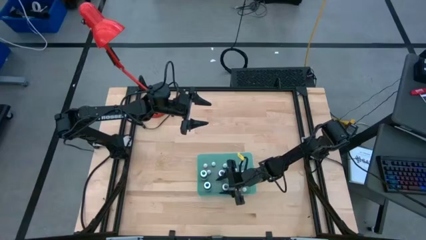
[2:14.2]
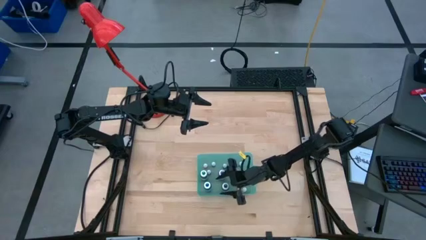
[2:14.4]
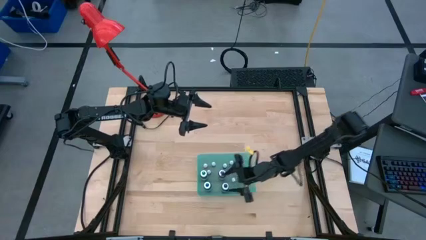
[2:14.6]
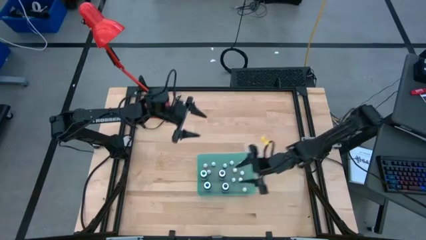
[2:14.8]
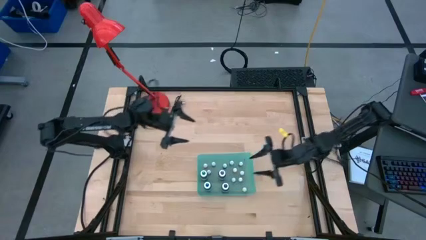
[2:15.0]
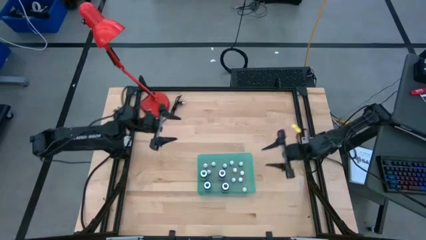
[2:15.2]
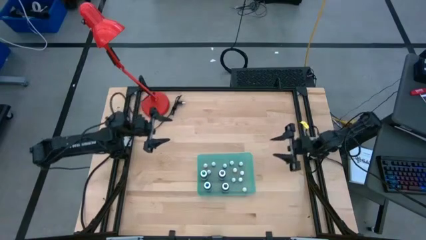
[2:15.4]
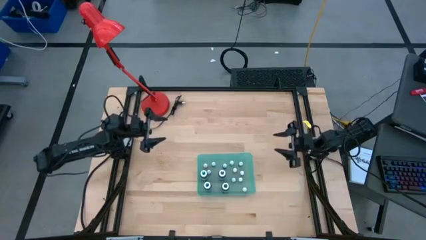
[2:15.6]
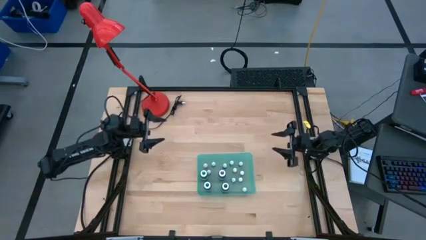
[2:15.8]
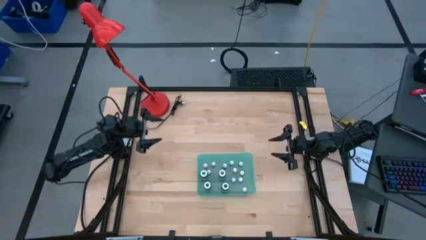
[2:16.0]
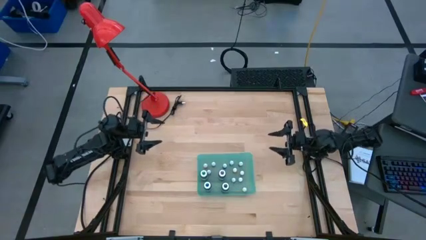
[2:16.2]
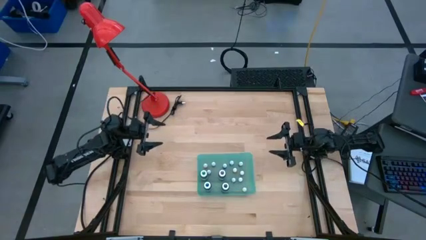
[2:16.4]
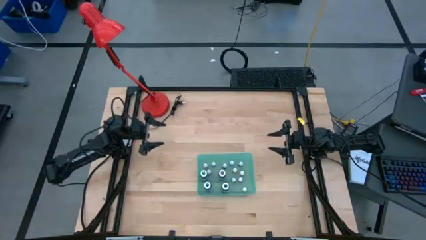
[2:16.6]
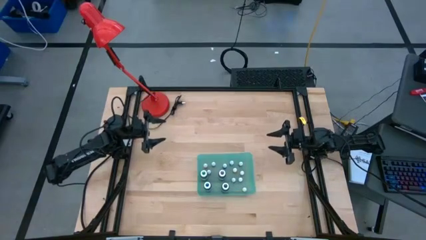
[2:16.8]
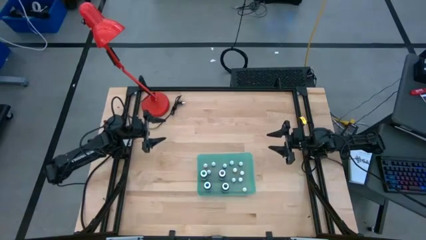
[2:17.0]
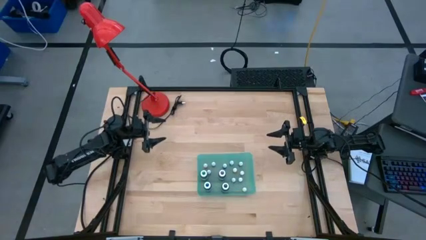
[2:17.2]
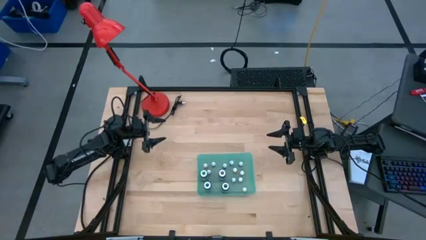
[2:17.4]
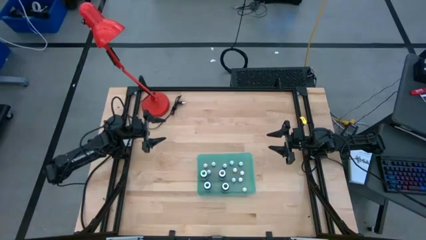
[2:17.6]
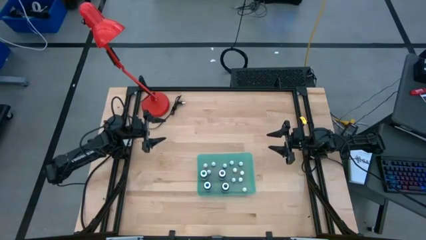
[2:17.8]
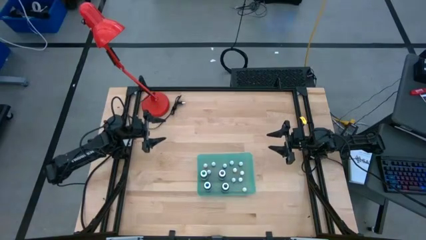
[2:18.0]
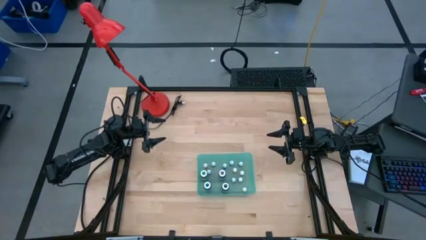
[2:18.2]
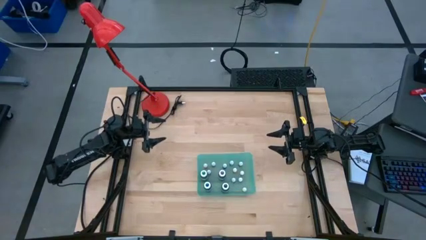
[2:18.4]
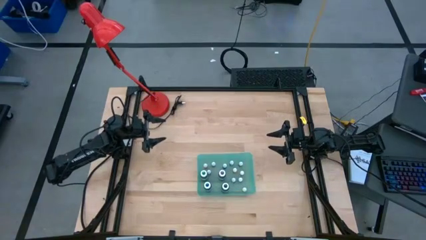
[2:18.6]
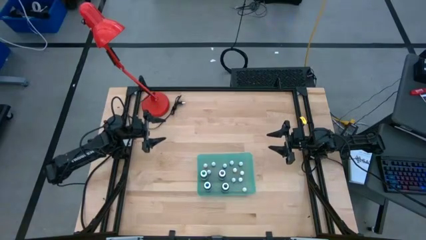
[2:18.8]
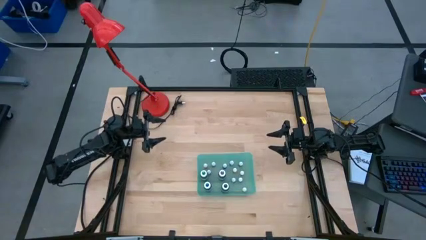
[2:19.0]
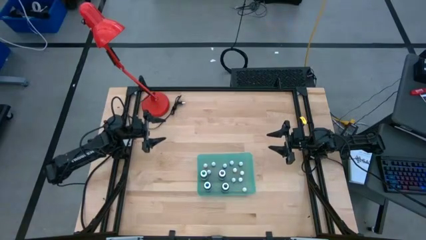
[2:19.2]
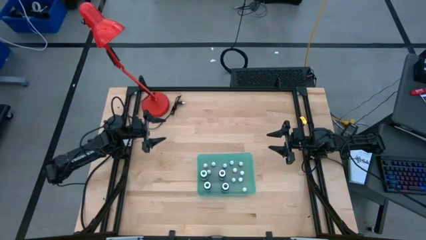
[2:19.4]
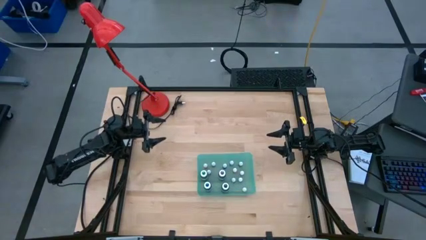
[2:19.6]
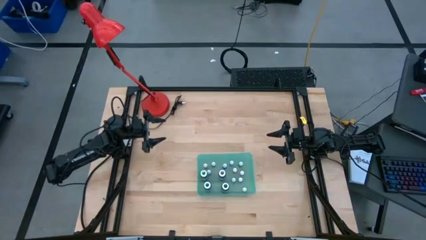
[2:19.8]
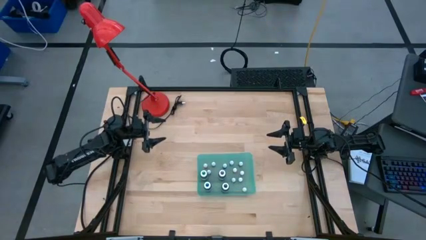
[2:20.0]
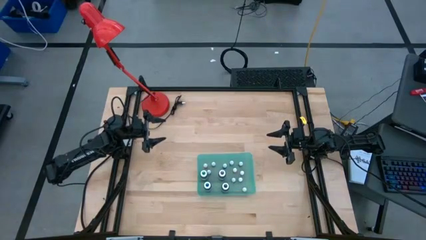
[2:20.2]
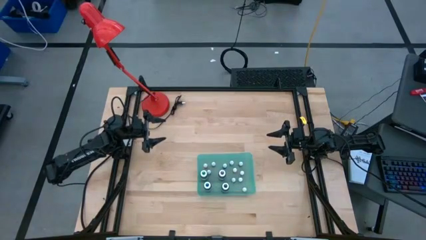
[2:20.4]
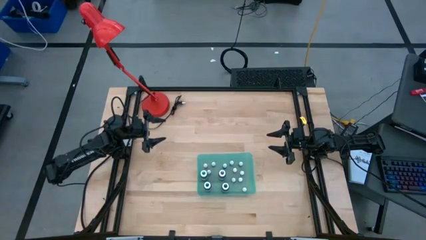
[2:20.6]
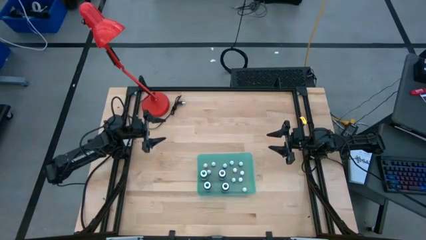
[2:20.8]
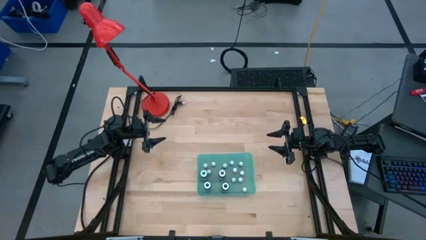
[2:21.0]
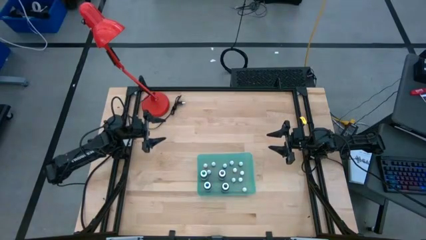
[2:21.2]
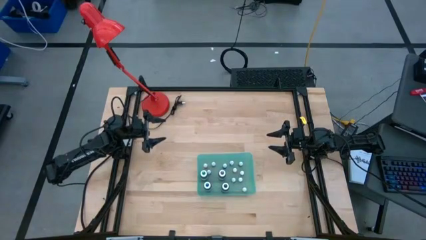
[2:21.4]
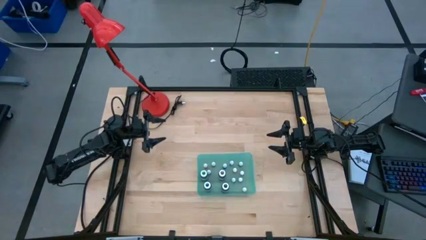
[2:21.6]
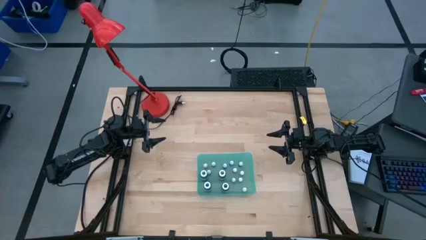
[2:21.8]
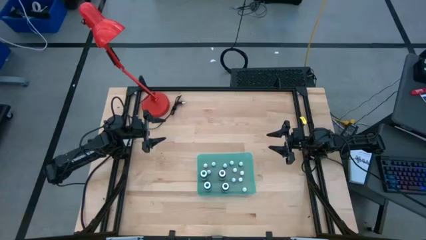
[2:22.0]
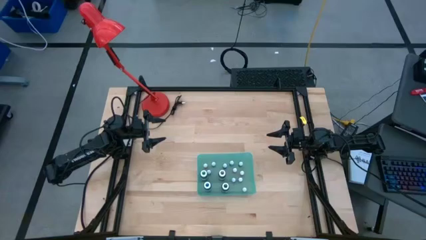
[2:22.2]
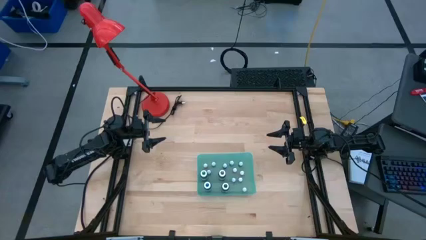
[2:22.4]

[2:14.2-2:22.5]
Task: Pick & Place food coloring
Return to Home Position

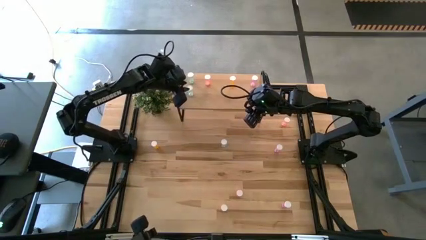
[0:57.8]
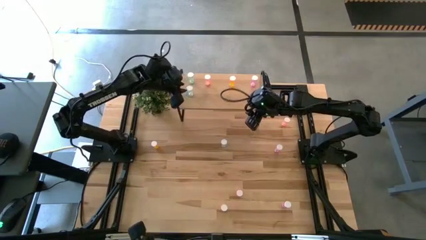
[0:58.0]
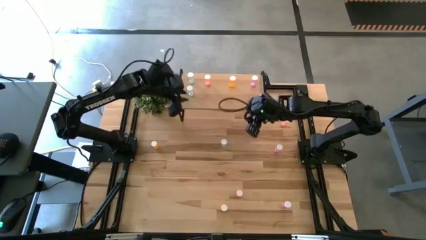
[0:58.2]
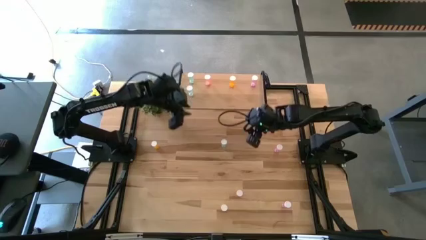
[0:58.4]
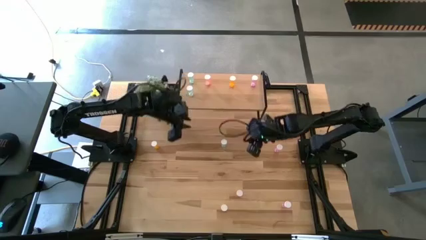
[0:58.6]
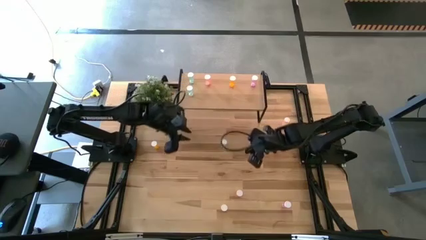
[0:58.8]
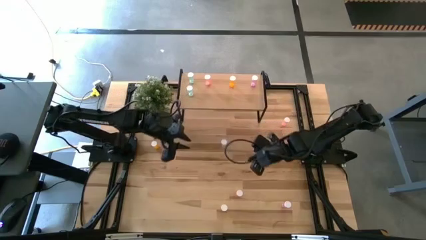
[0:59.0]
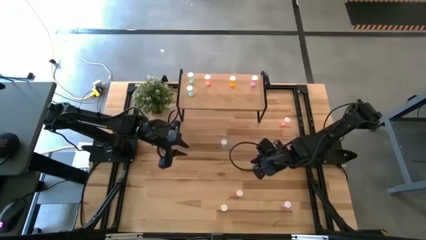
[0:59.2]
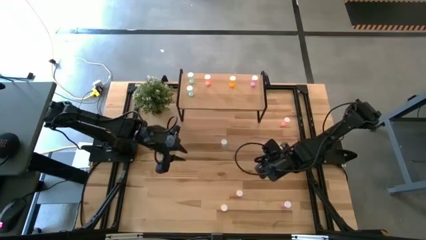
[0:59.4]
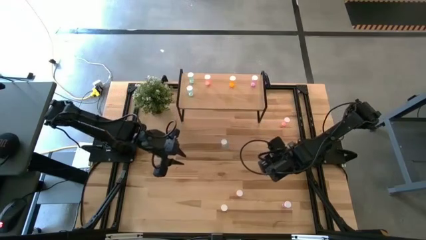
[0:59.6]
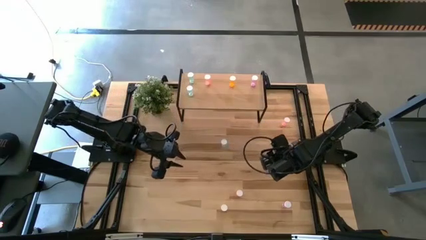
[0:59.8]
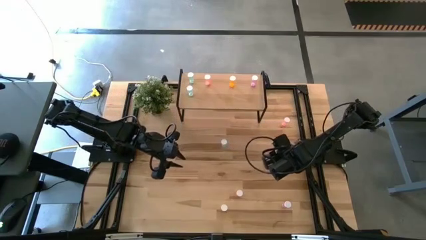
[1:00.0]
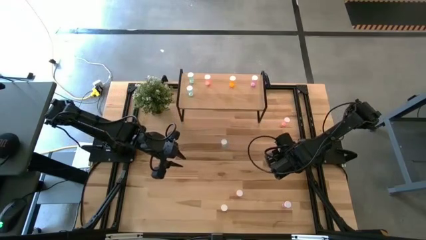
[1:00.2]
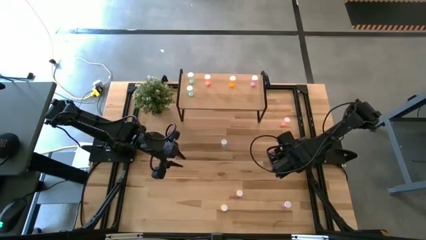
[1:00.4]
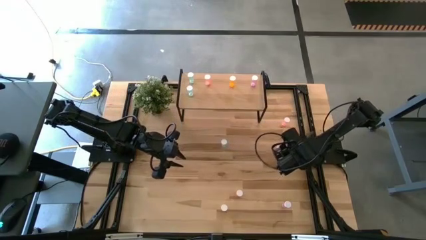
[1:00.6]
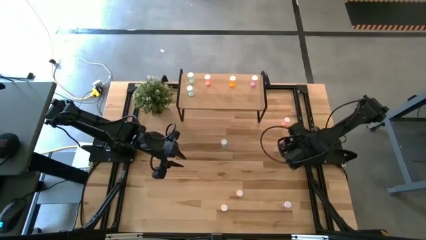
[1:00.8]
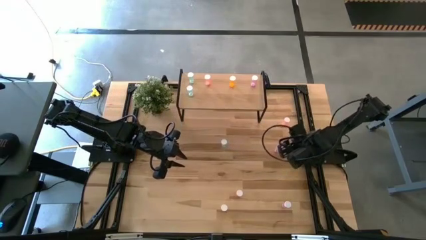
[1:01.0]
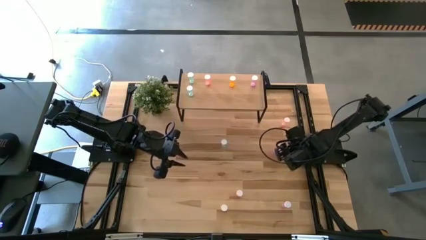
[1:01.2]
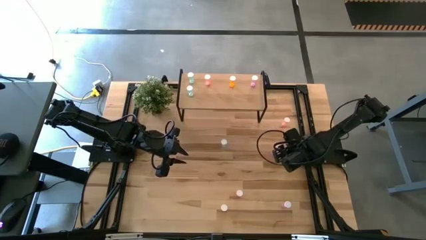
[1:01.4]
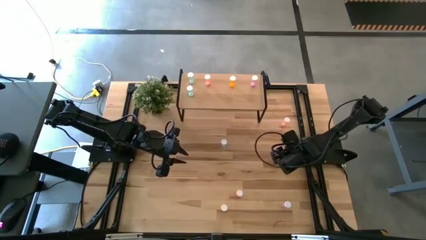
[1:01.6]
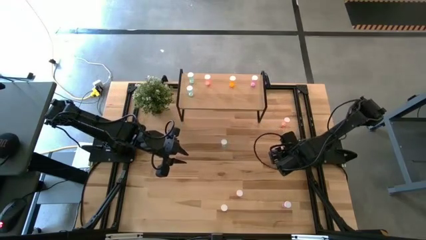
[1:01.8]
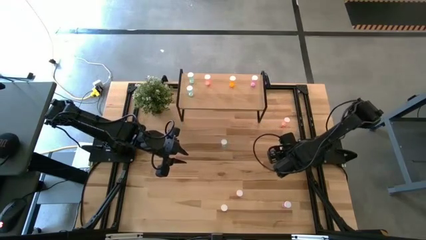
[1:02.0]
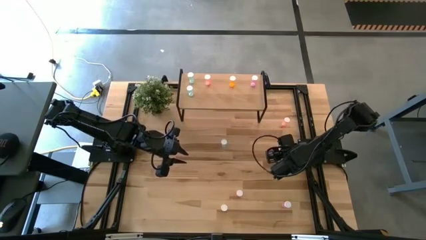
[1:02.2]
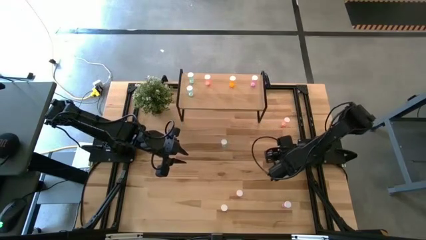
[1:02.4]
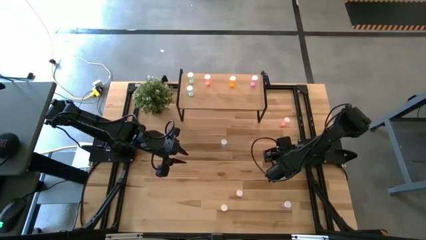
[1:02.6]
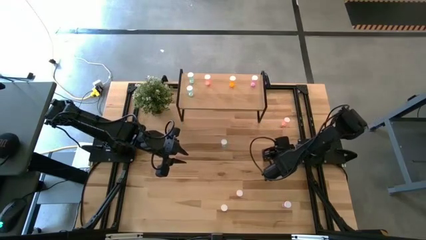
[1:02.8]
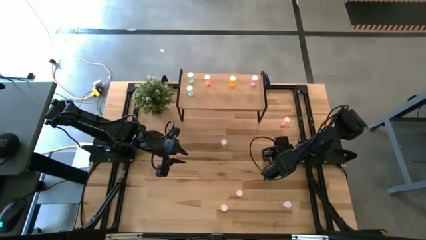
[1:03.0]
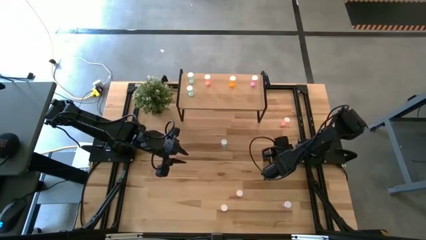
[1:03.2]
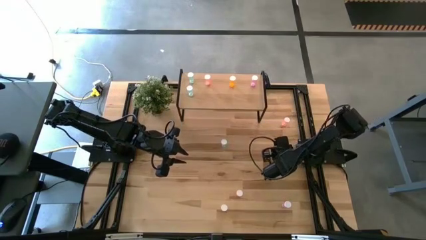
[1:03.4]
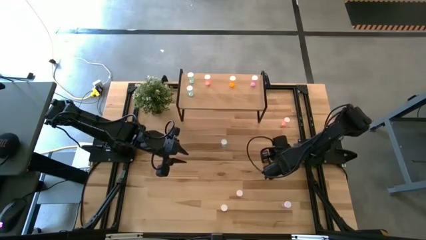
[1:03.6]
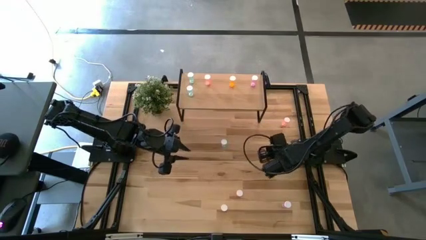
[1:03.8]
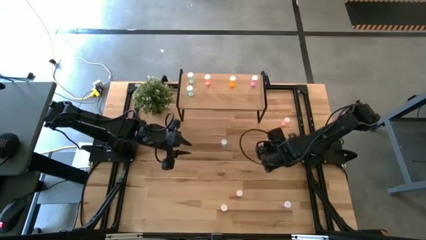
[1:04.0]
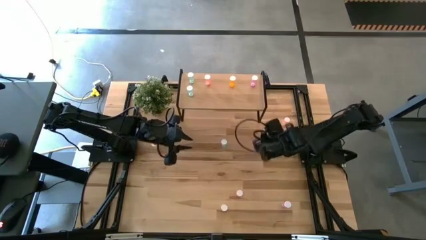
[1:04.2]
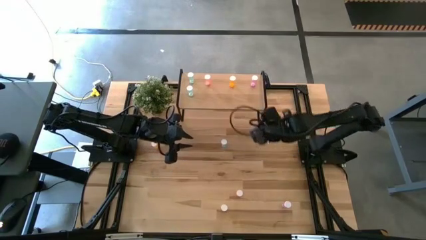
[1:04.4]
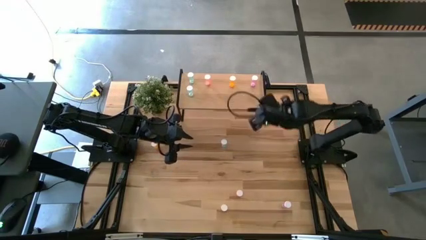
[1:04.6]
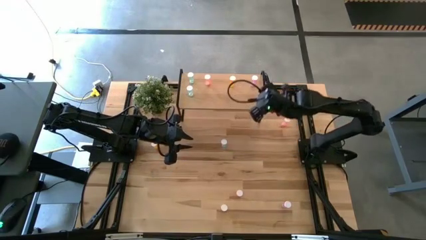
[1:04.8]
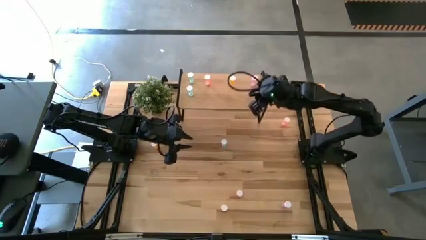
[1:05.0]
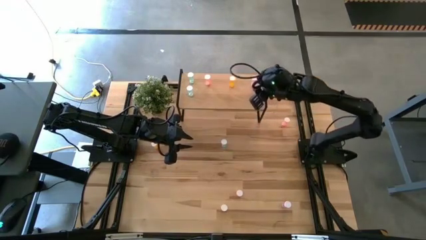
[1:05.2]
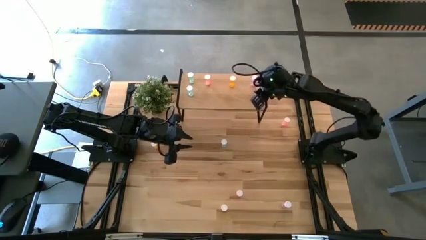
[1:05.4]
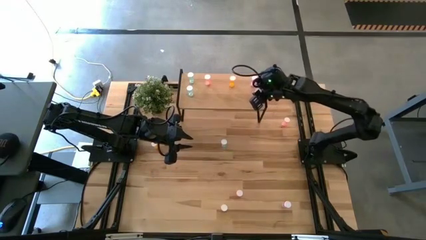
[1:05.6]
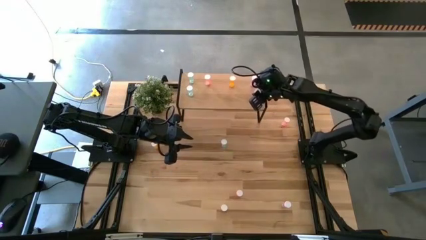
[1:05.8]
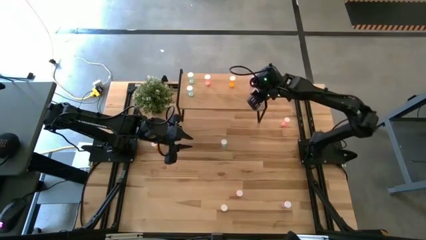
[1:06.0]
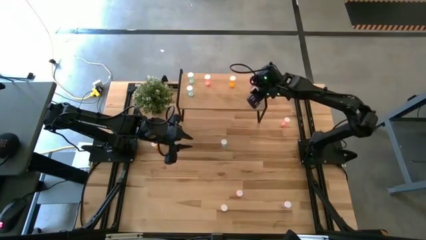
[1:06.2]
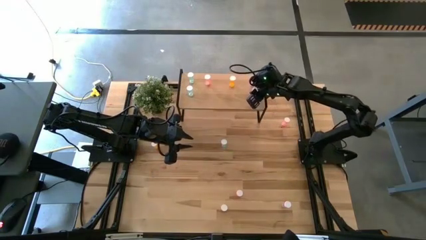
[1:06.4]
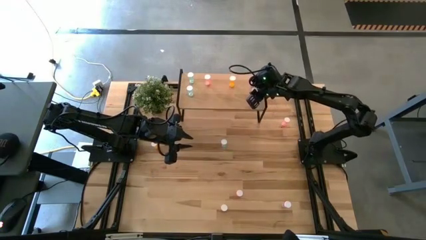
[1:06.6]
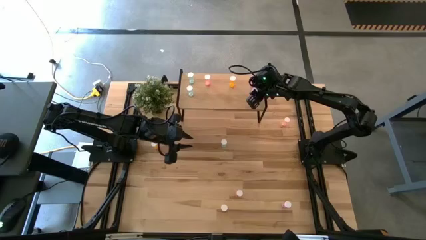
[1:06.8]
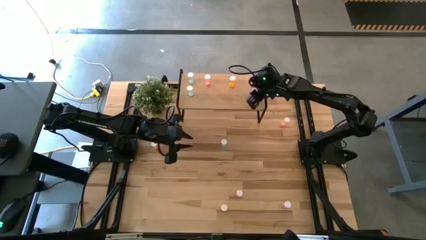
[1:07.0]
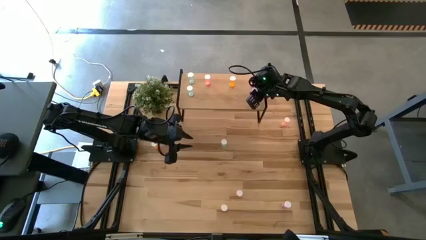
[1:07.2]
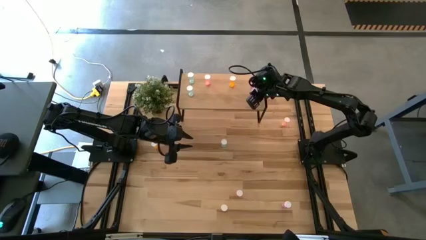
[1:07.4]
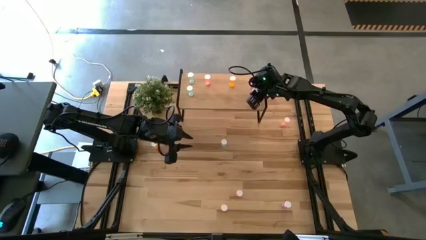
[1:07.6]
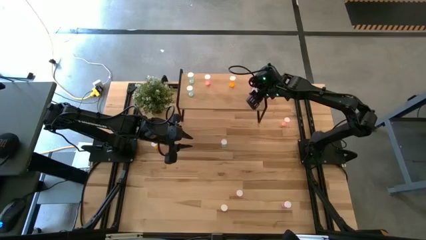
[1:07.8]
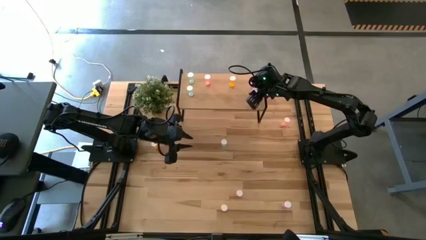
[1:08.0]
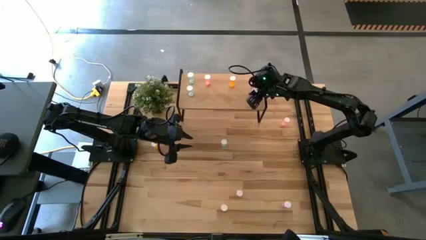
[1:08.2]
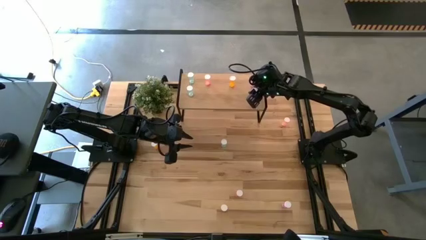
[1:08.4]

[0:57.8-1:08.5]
Task: Pick and place medicine bottles onto shelf by color
Put the top purple pill bottle on the shelf aligned with the other purple pill bottle
